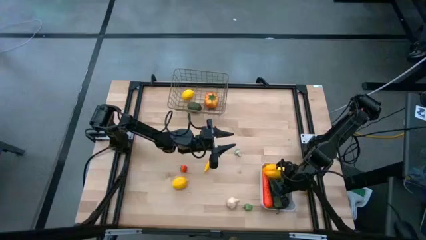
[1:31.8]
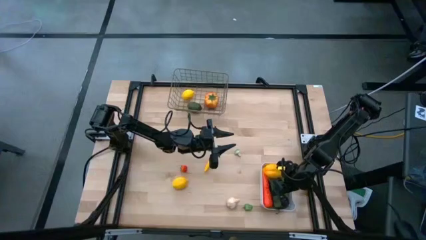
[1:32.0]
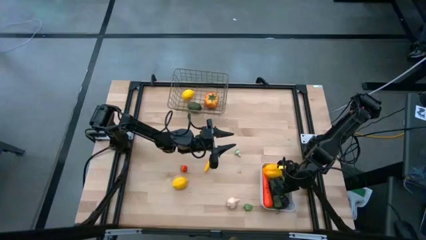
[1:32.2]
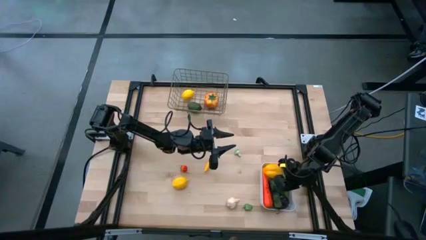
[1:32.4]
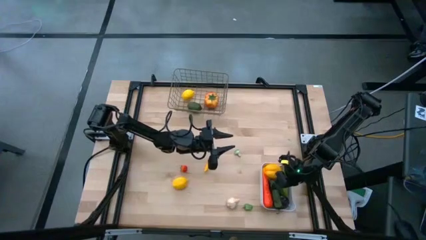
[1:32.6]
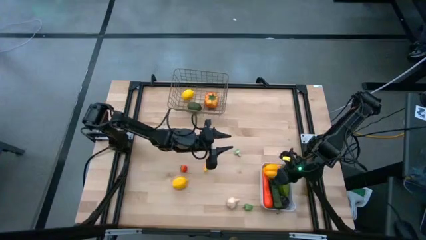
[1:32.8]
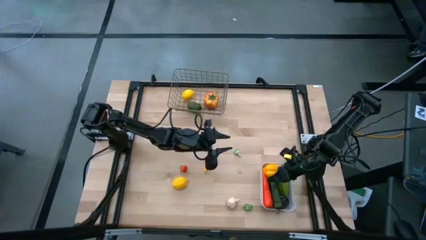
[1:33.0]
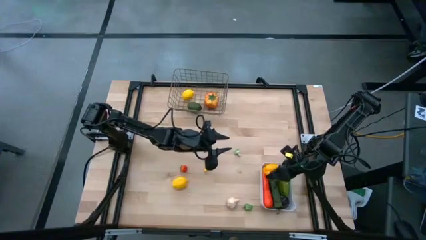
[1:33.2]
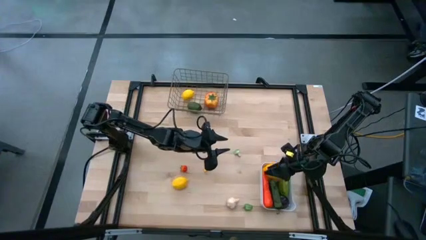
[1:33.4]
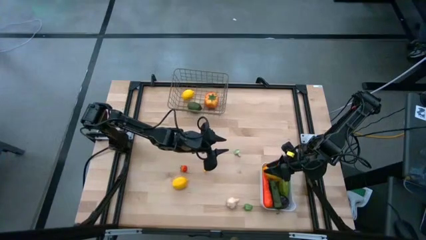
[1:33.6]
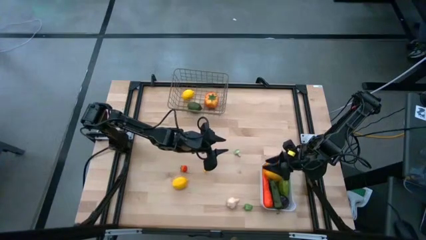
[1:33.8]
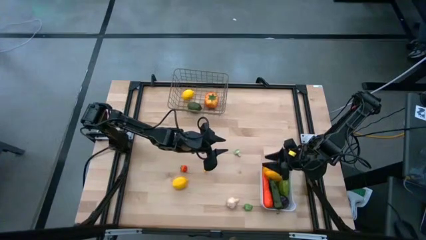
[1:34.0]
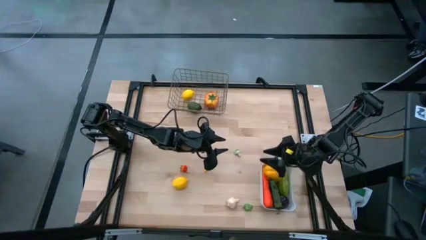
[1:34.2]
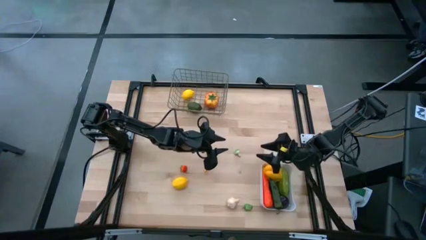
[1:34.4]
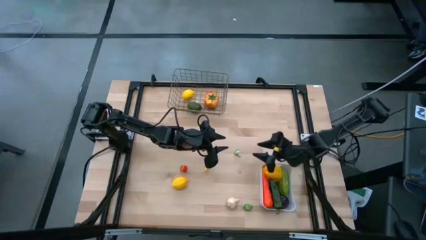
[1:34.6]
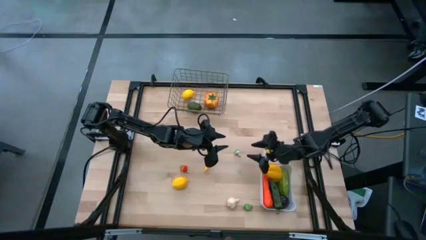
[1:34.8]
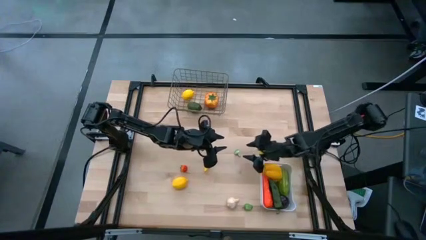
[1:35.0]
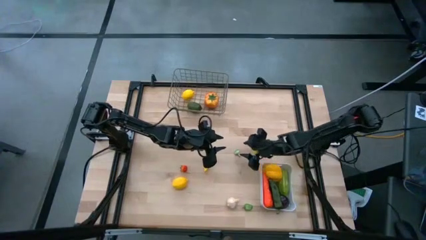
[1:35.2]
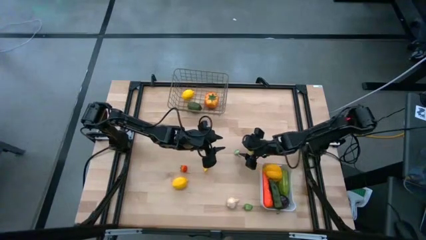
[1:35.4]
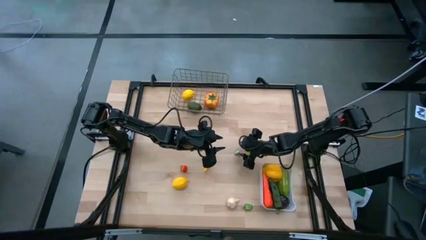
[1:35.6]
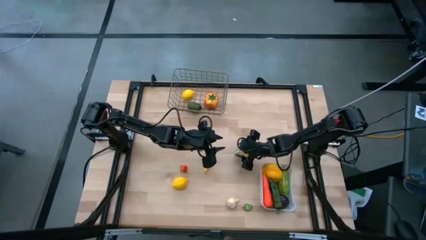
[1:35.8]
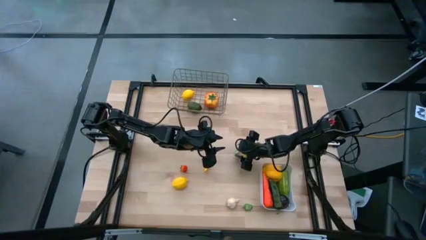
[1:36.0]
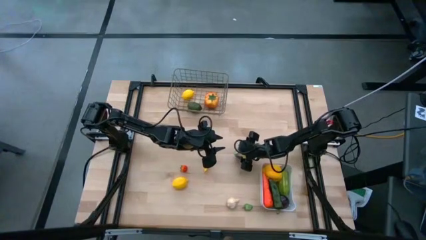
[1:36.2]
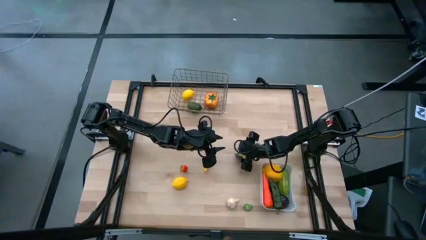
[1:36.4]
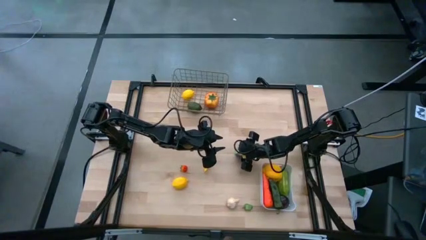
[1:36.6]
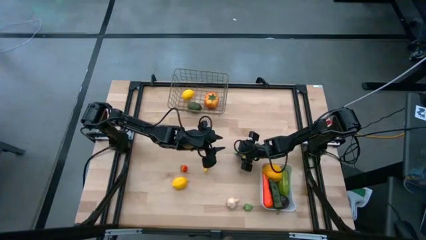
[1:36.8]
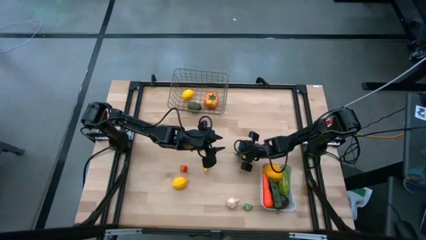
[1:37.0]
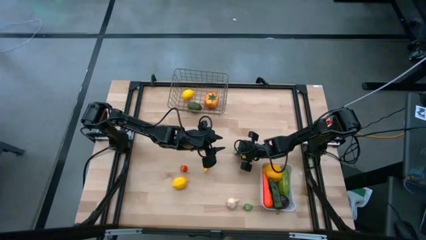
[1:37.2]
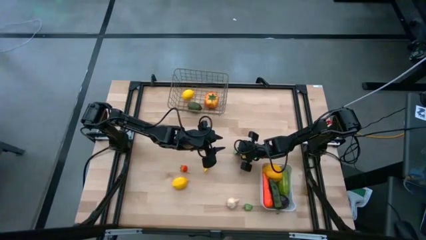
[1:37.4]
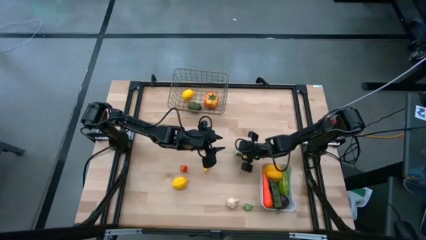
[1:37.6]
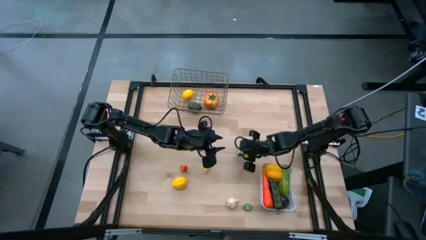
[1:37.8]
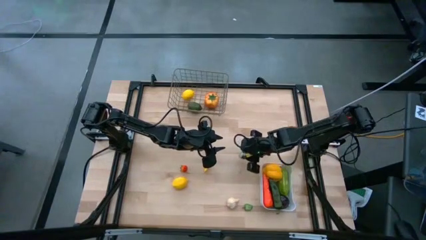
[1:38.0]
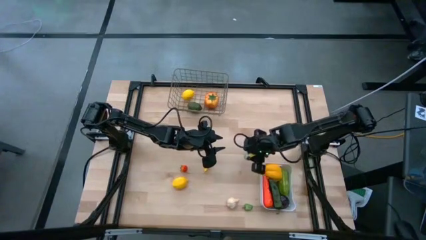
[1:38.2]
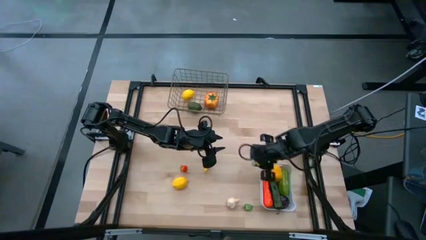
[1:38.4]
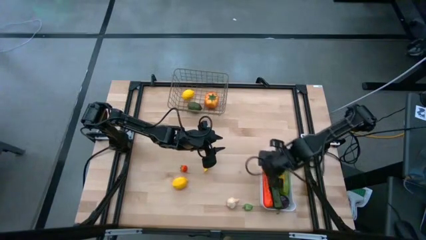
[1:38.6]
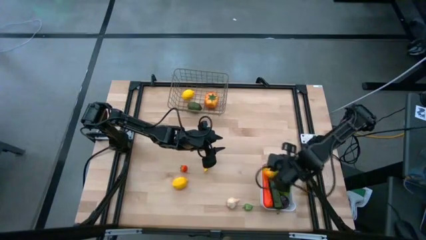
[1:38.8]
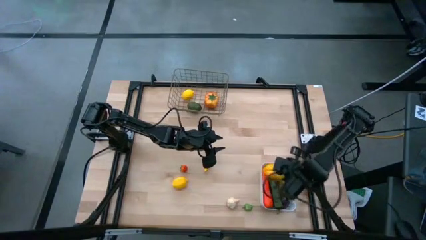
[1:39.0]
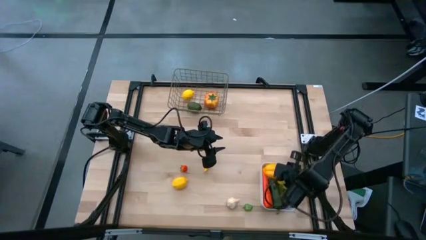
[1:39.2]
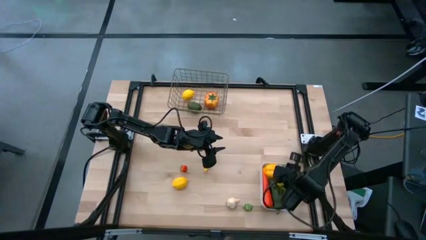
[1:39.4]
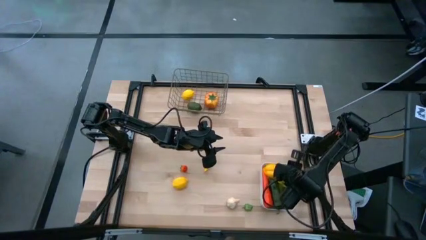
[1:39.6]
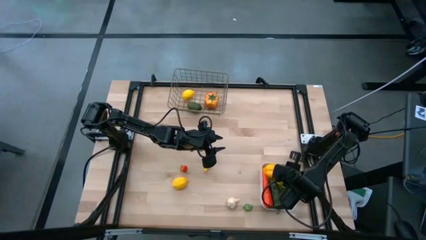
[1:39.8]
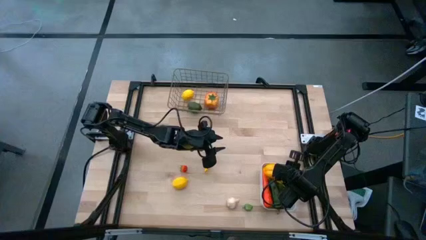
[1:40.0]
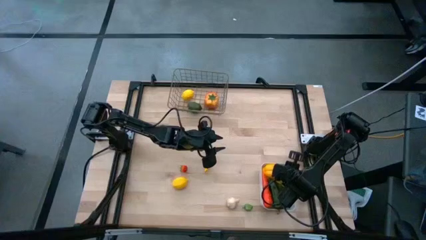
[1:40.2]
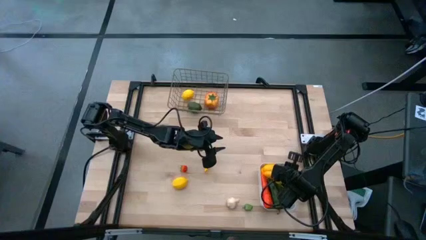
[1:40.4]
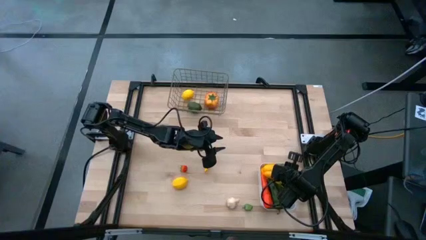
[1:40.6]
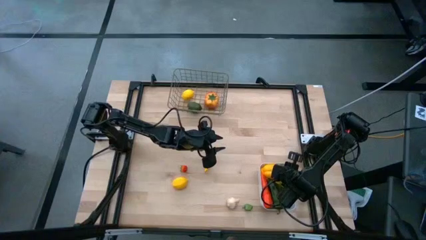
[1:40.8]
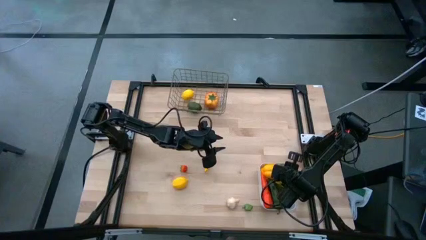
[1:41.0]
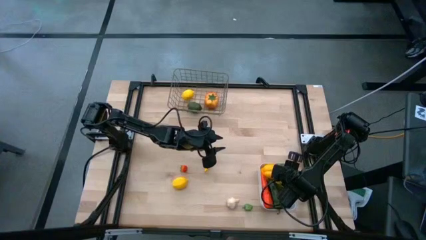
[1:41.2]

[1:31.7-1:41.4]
Task: Sort produce into baskets
Put the mushroom into the white bin

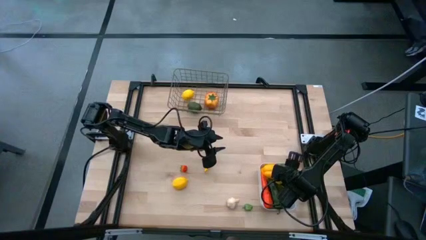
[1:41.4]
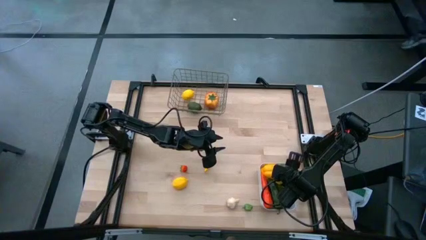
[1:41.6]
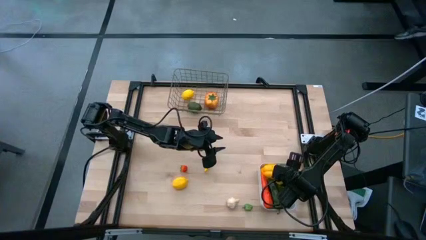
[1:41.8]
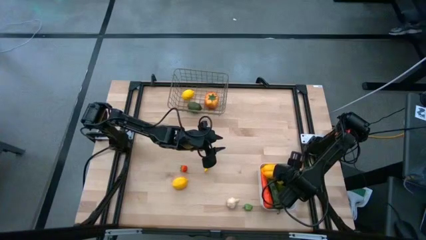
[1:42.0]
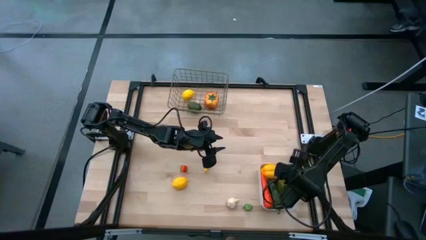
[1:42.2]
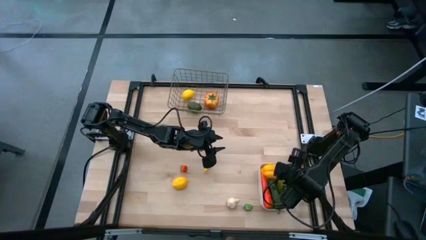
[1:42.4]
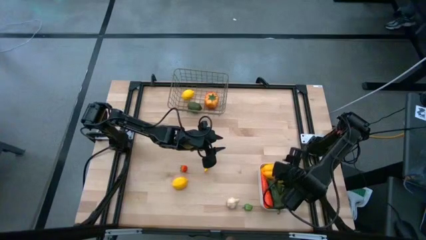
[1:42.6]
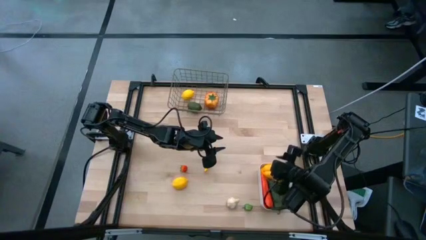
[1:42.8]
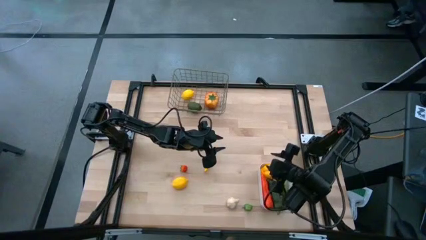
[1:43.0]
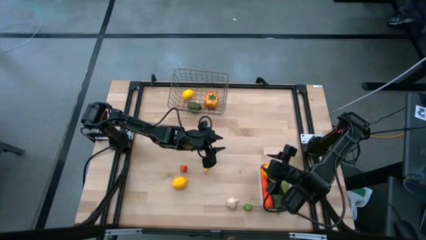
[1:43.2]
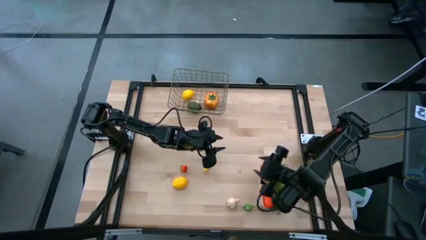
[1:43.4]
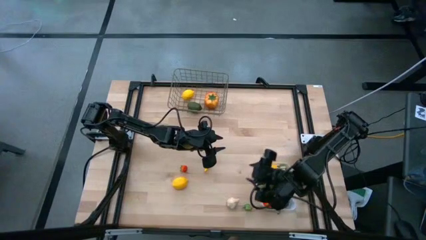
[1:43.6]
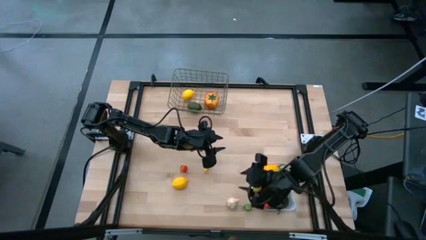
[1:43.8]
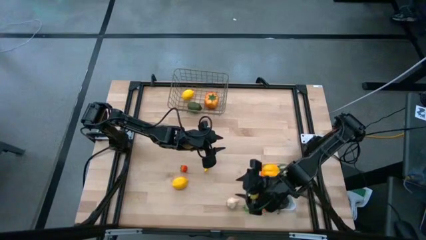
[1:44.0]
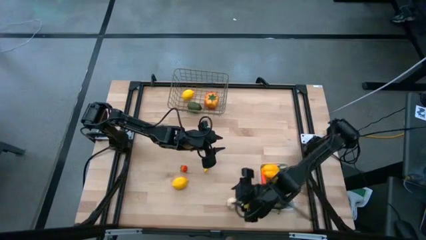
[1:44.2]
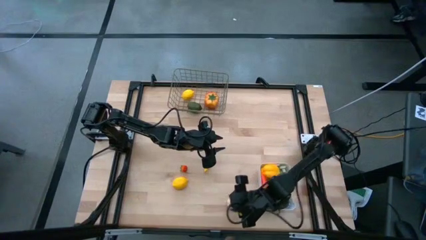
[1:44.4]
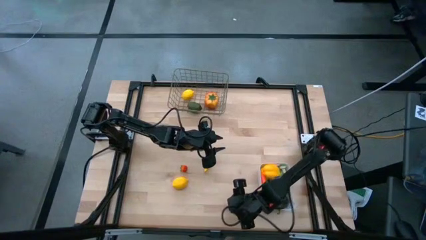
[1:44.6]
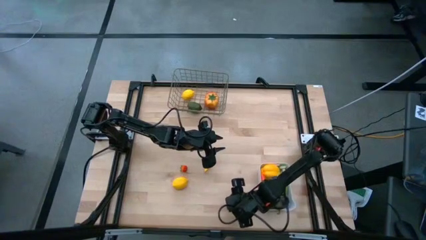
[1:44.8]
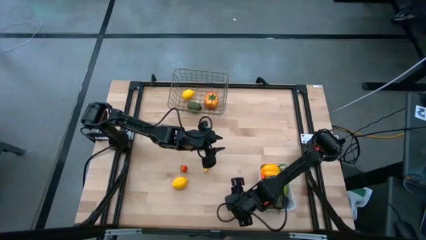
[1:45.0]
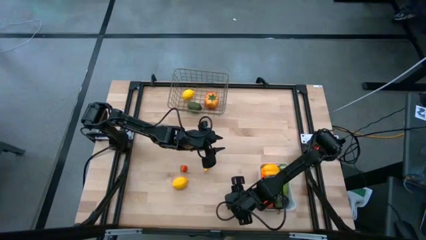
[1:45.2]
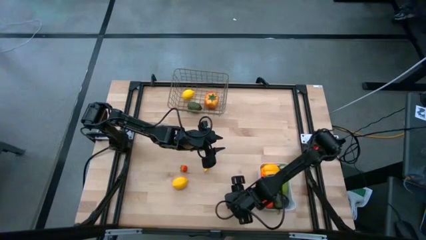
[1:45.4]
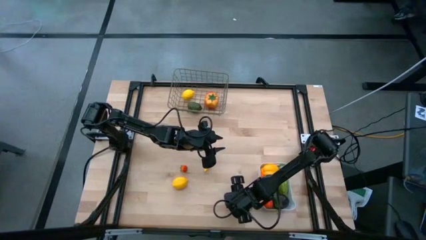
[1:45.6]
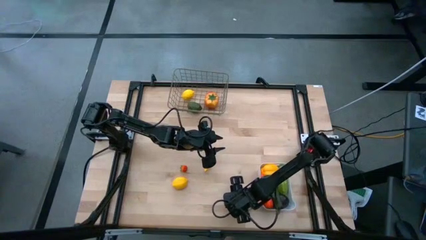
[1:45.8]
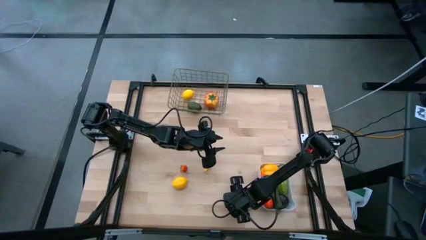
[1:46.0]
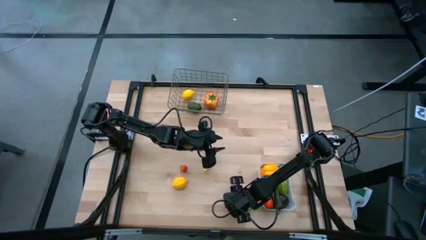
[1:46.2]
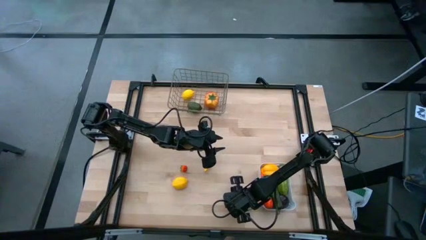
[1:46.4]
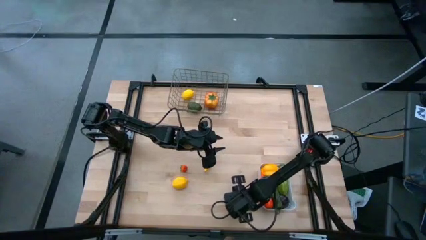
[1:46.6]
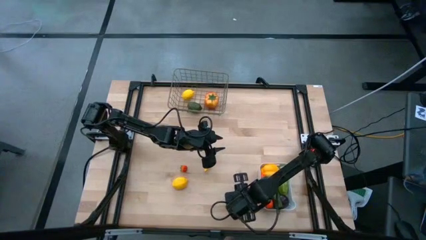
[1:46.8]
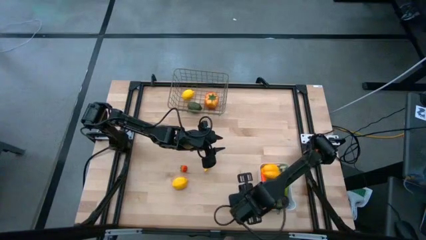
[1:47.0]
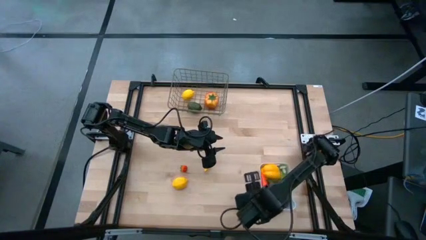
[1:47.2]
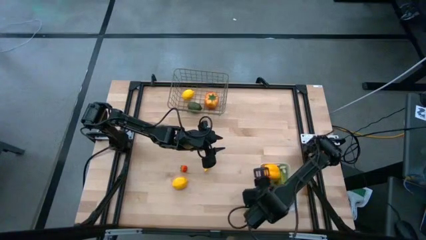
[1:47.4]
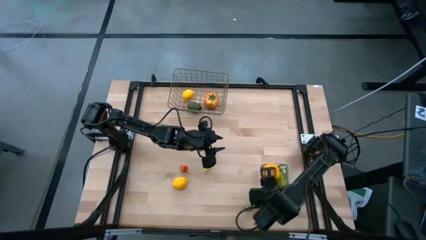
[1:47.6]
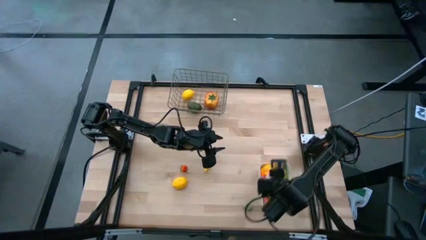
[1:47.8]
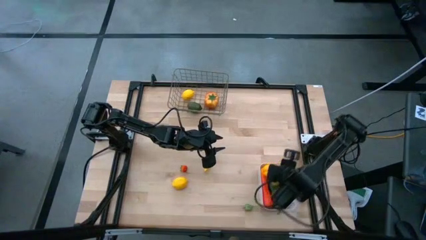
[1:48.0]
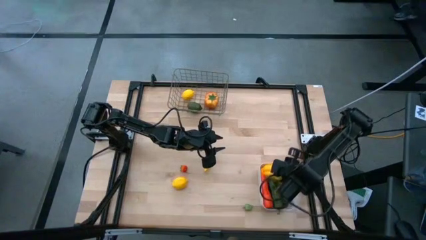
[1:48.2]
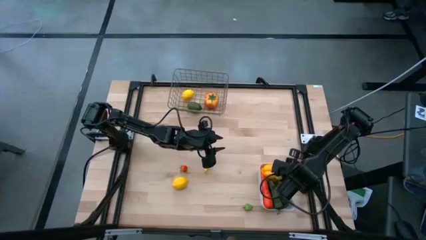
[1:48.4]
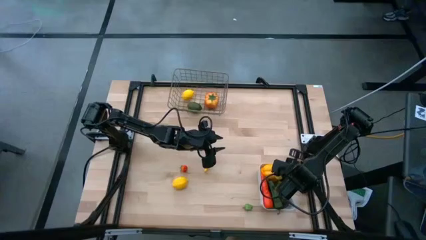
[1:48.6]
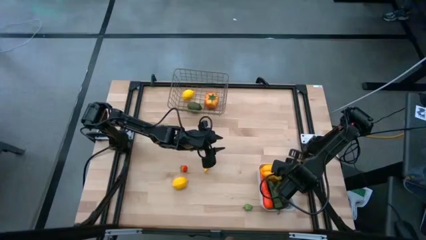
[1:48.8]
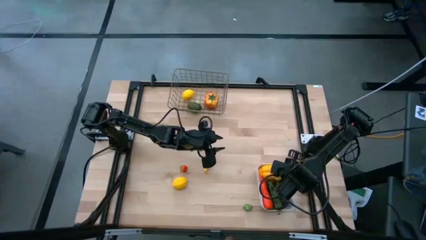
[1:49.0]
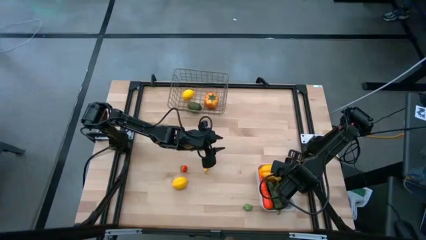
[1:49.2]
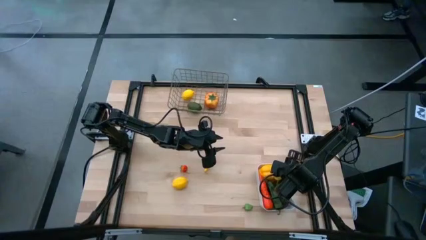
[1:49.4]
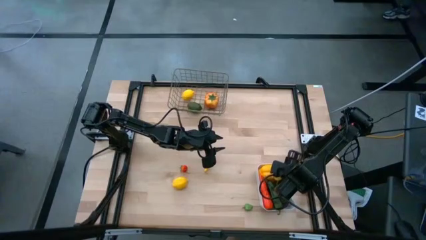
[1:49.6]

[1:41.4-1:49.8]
Put the garlic into the white bin
